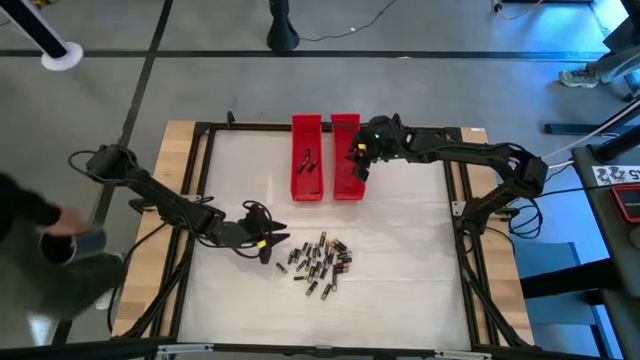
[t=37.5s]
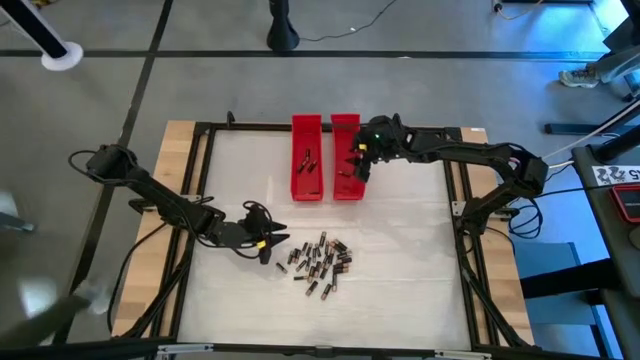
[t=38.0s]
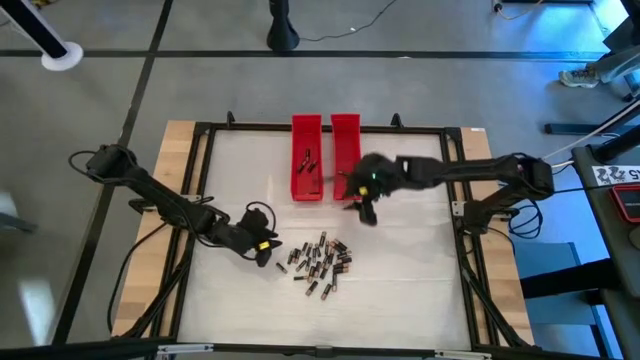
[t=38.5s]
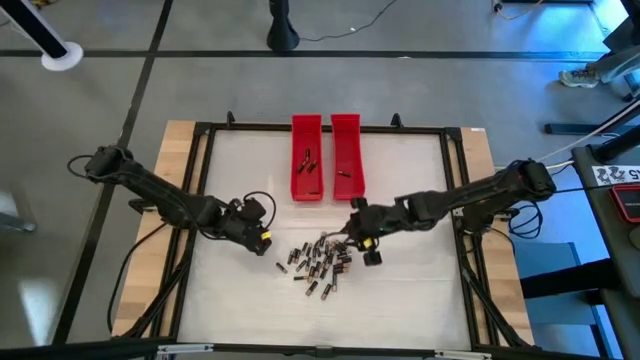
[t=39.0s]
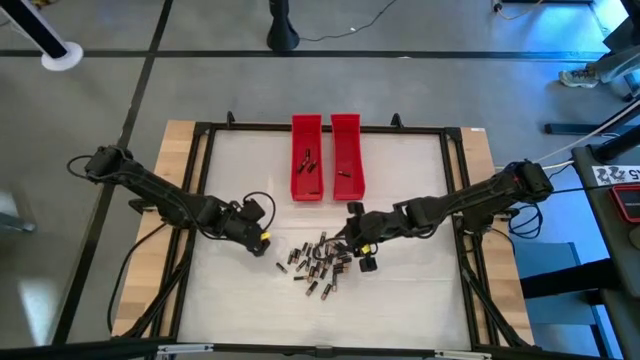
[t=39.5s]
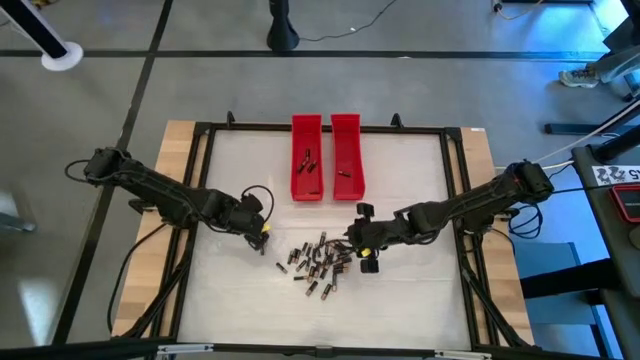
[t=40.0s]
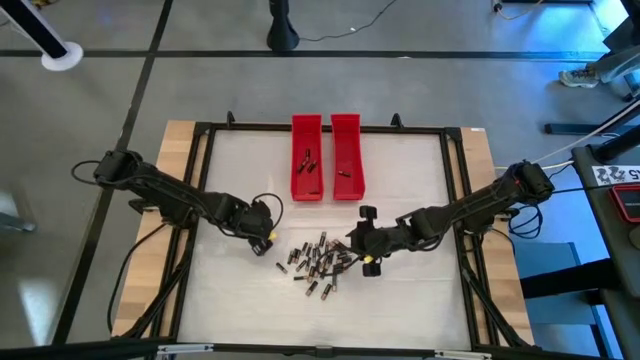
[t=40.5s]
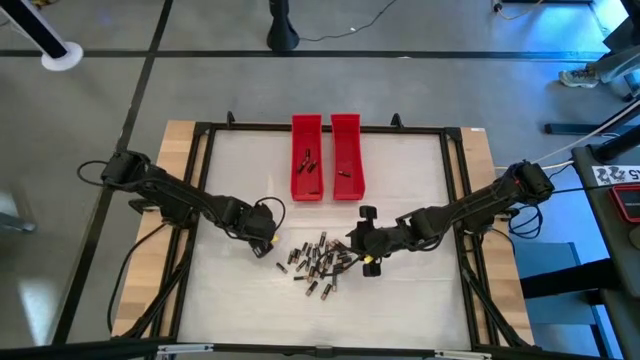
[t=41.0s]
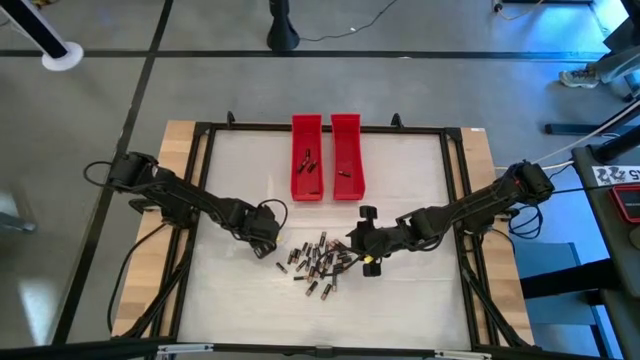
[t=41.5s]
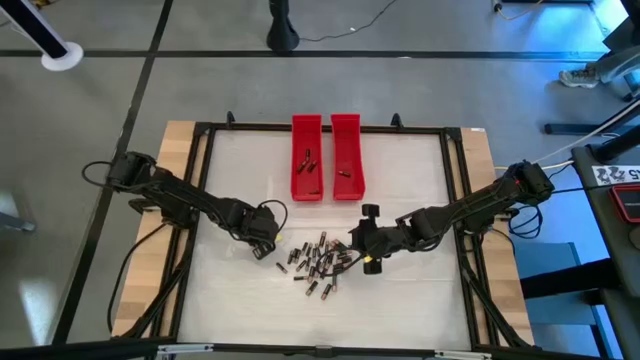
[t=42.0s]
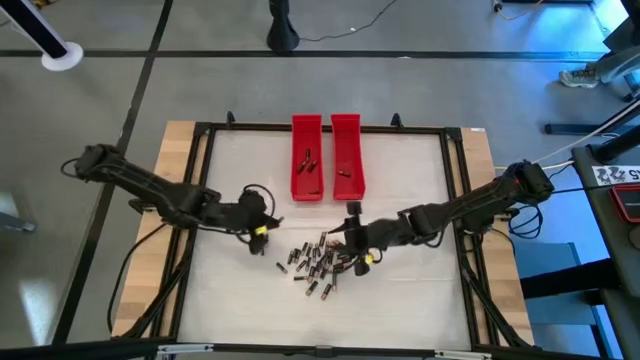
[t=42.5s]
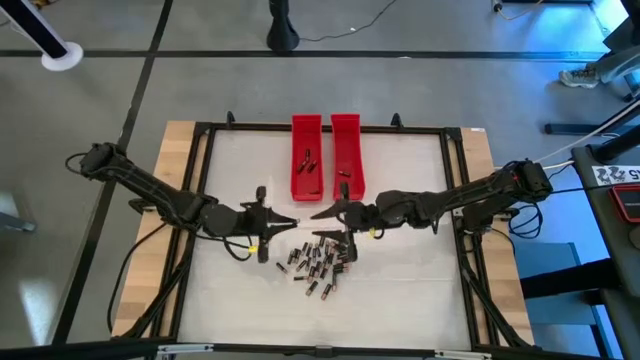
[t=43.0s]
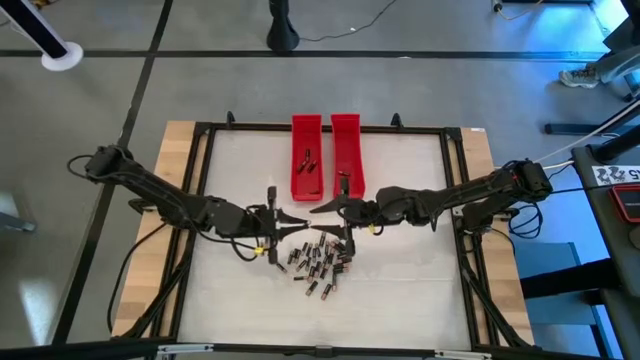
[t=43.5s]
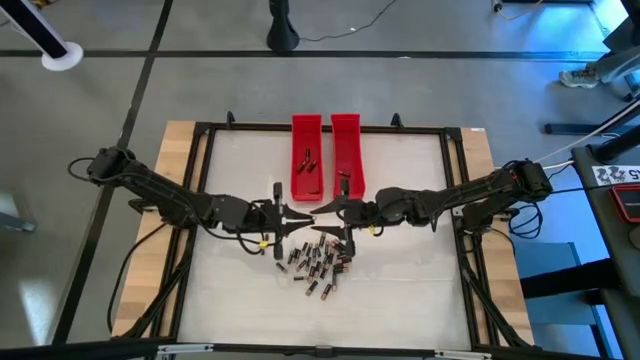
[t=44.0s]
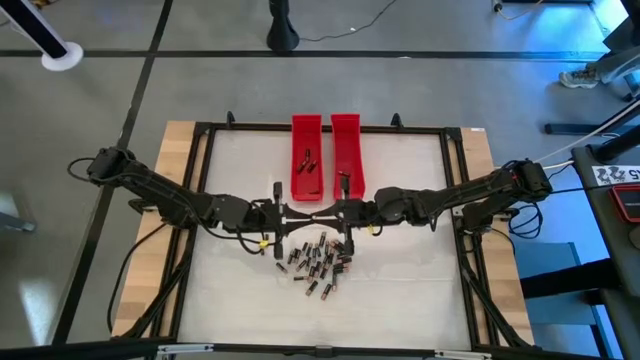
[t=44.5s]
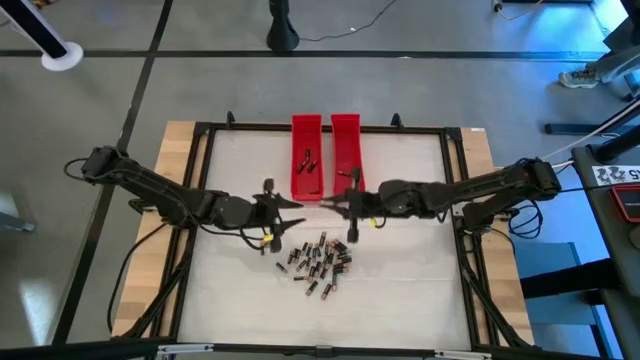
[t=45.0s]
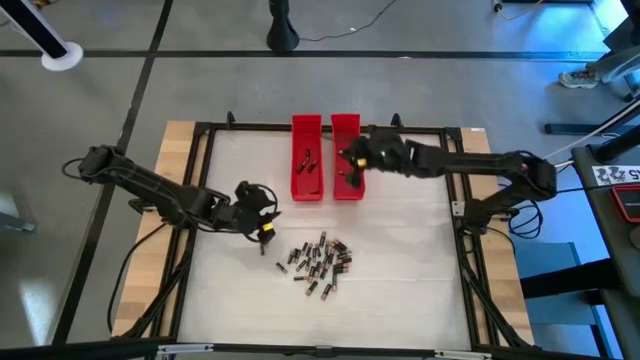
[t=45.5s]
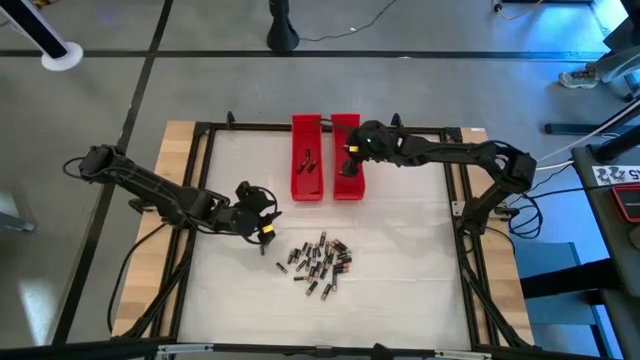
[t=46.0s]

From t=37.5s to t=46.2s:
Task: Sort batteries
Put the small black battery into the right red bin

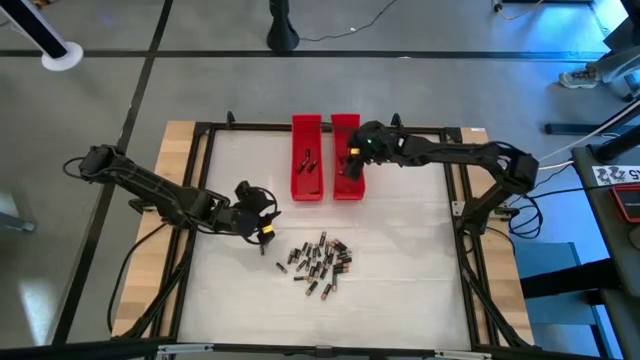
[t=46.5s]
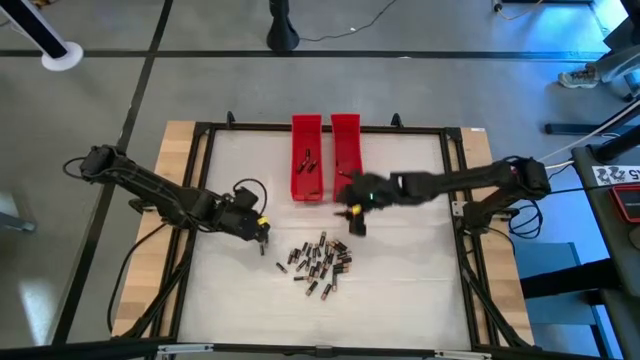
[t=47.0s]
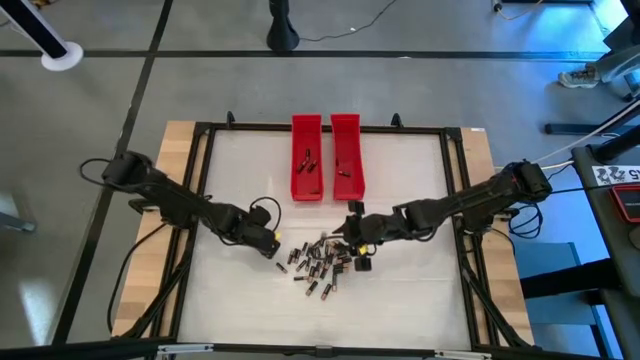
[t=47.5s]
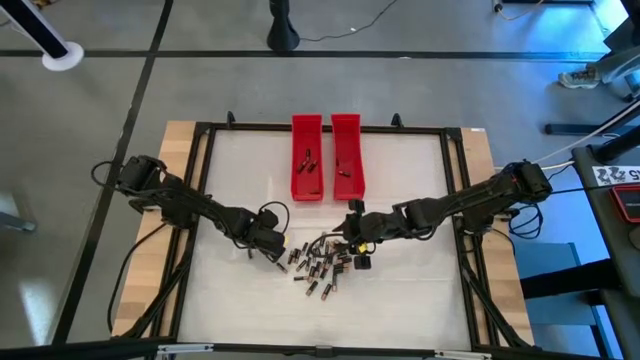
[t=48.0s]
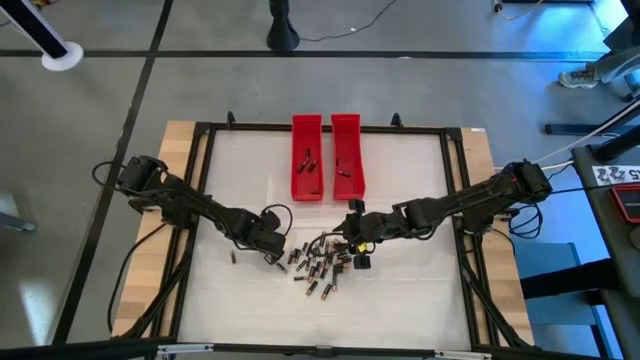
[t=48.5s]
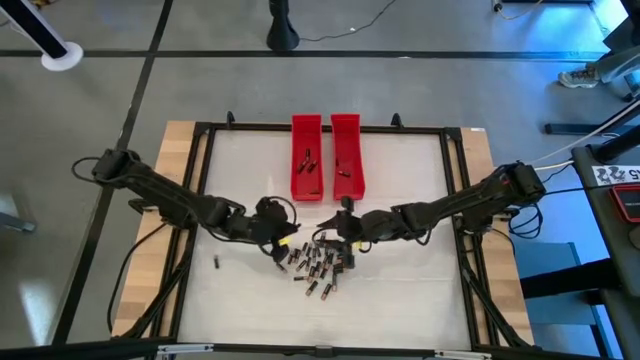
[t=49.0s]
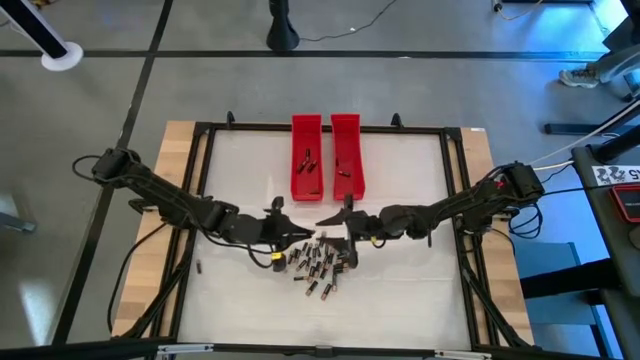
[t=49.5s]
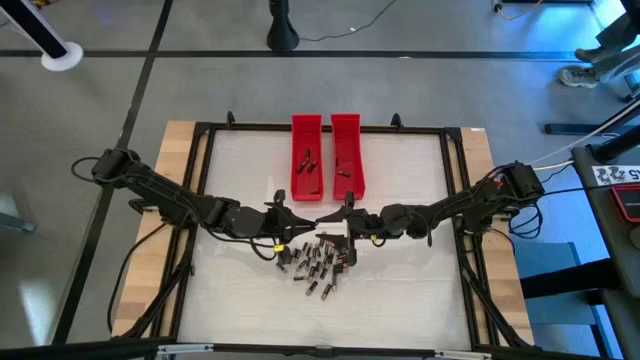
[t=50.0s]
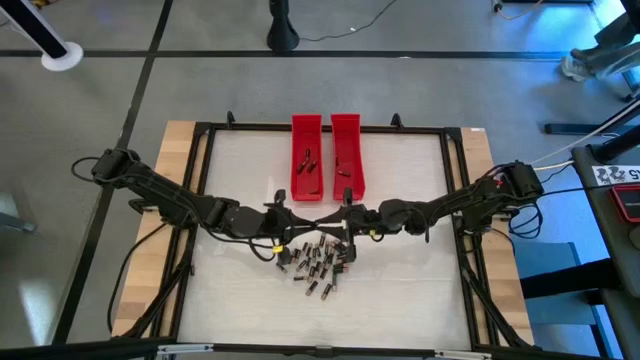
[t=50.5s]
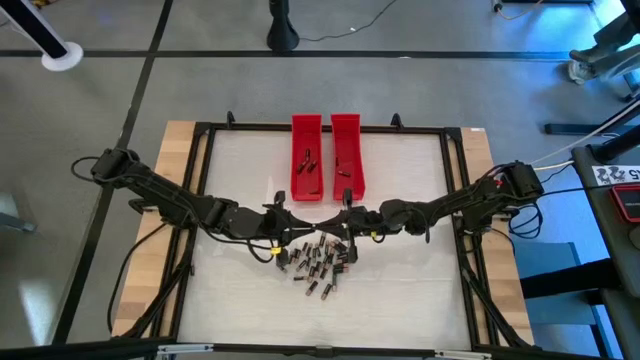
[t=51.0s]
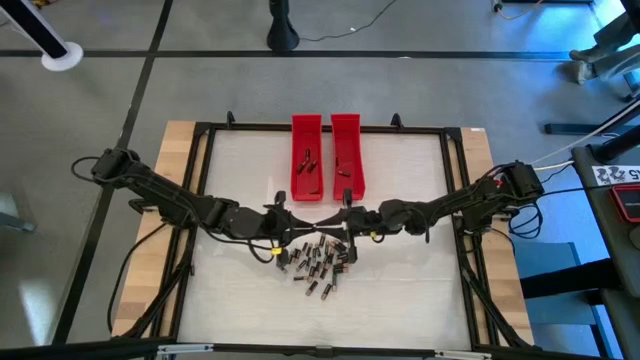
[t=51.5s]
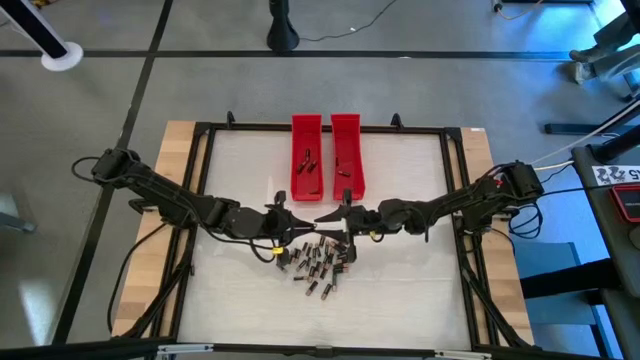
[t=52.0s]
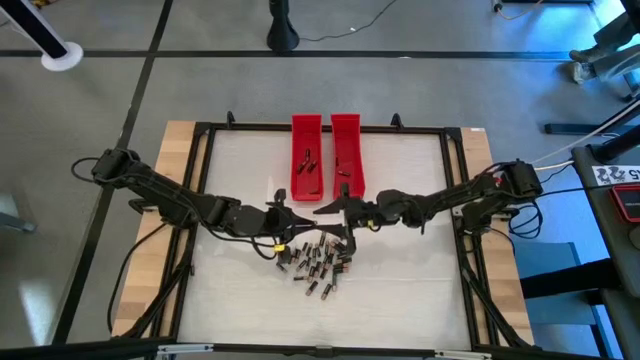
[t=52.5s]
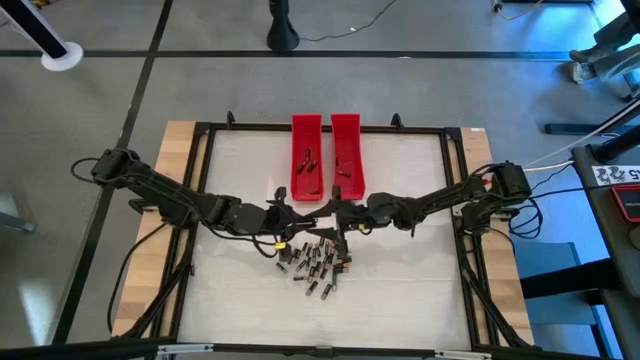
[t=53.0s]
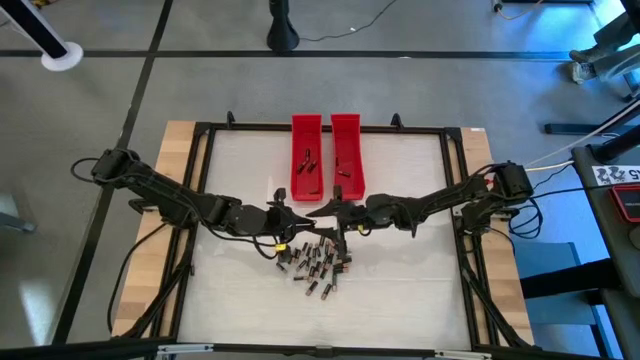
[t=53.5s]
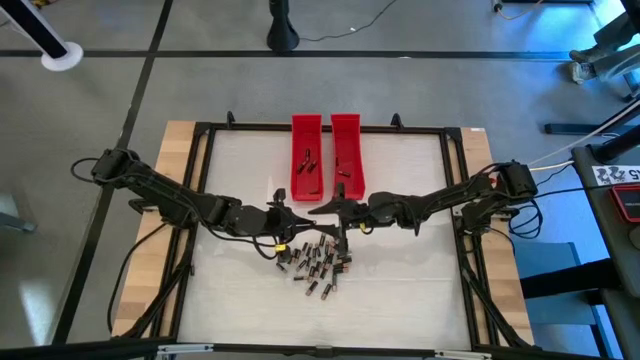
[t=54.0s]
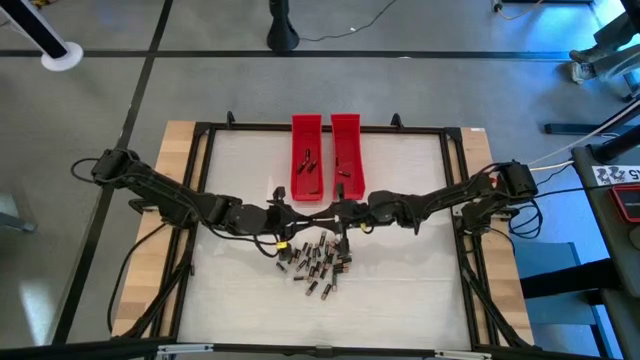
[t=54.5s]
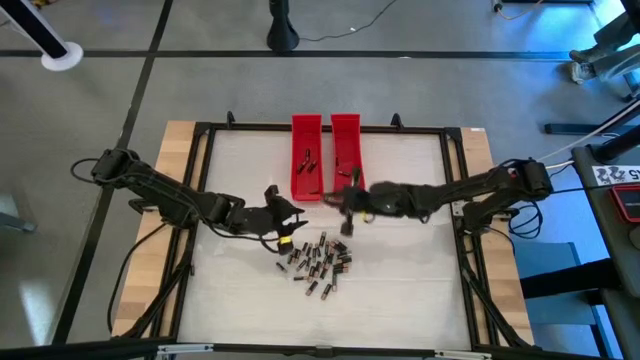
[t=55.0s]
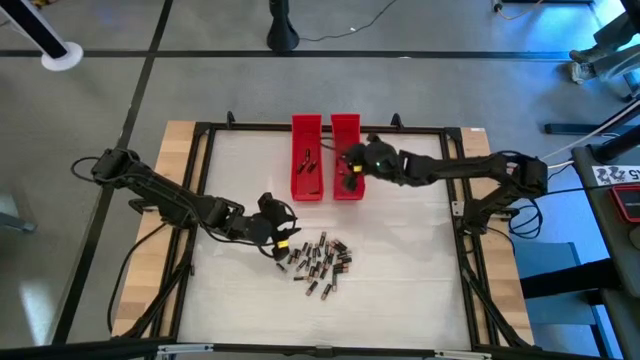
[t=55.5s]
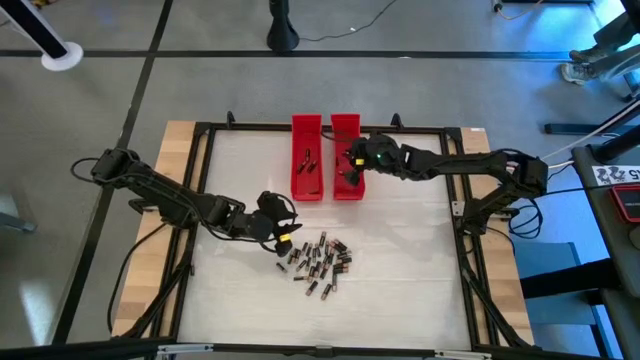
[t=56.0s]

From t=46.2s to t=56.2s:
Put the small black battery into the right red bin

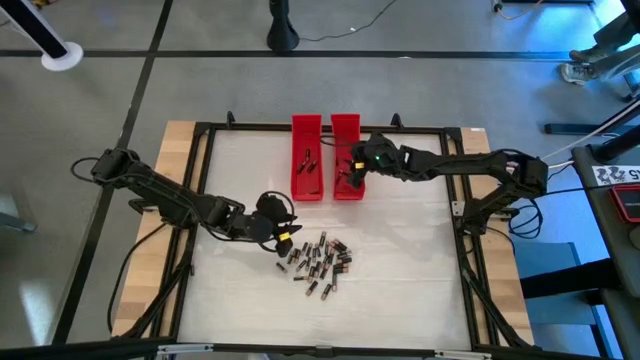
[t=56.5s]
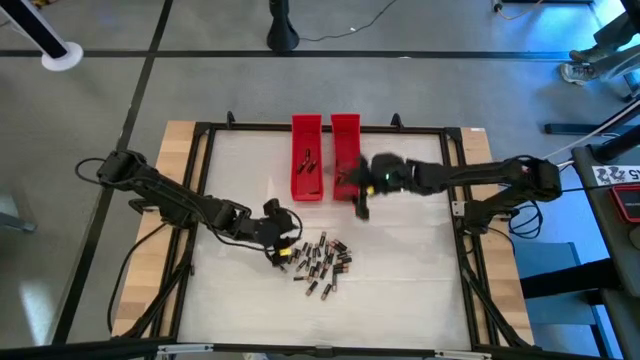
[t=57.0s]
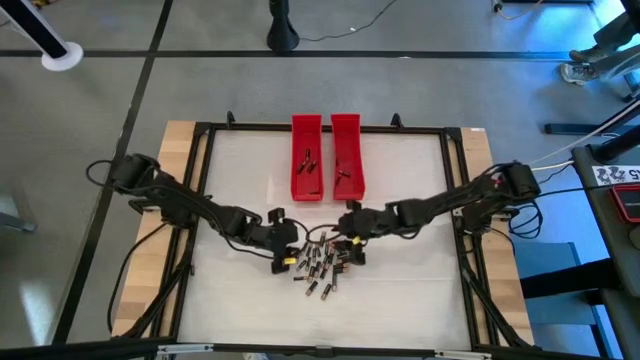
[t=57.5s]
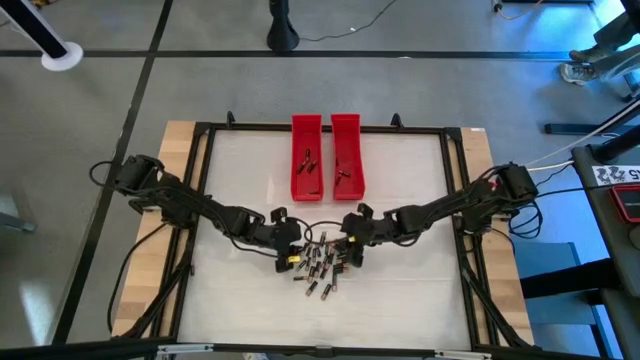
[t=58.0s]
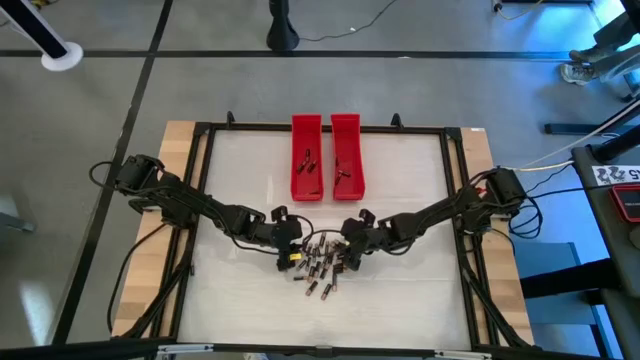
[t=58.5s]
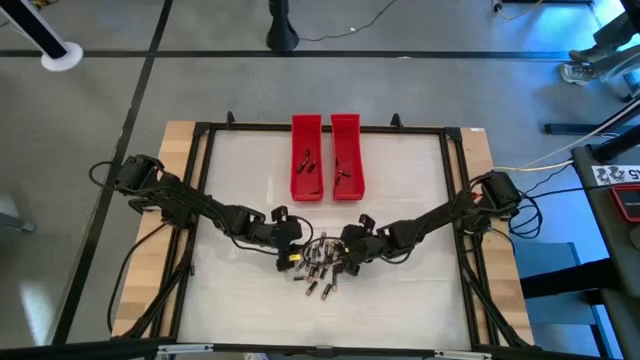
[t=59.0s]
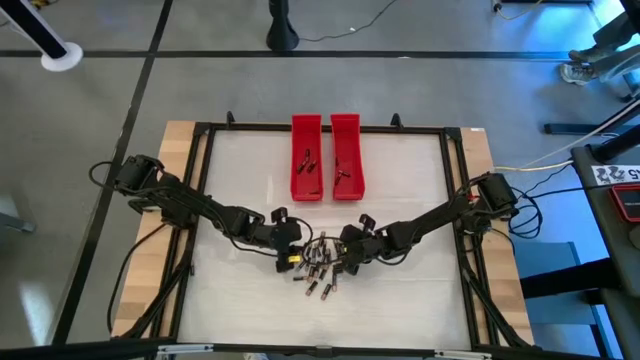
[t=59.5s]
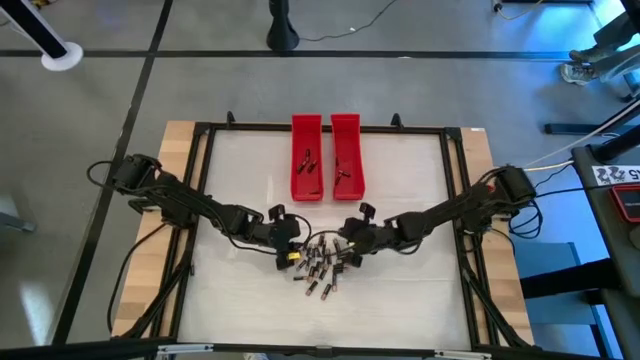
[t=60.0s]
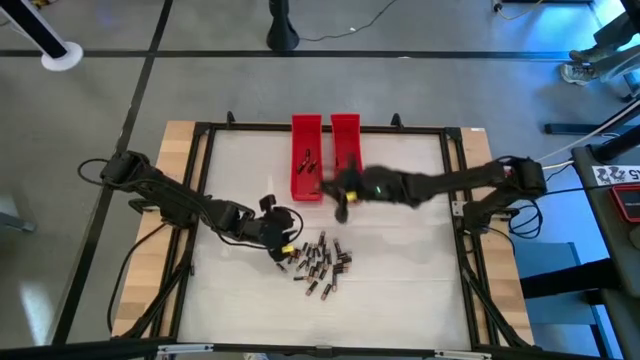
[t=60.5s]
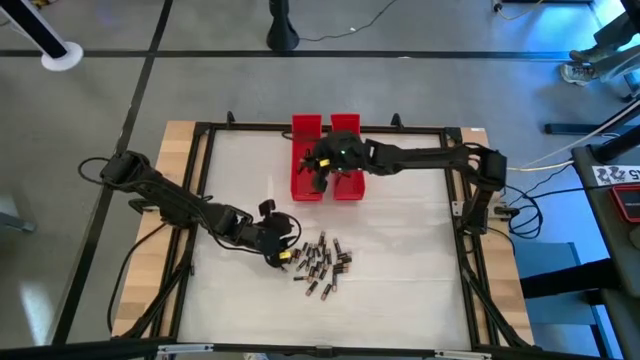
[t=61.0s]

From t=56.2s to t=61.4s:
Put the large black battery into the left red bin
